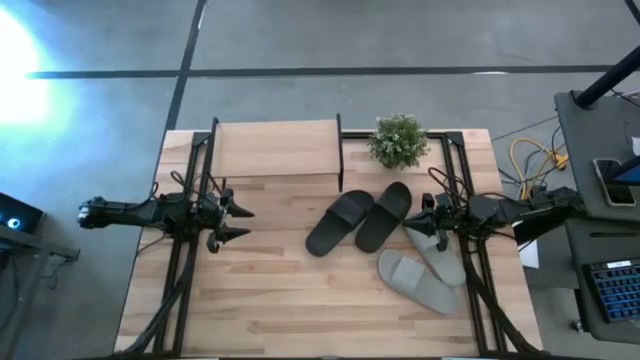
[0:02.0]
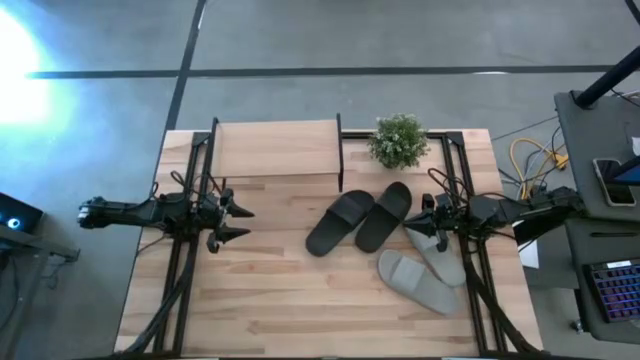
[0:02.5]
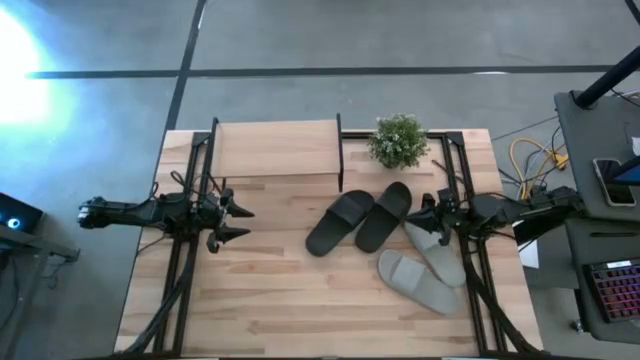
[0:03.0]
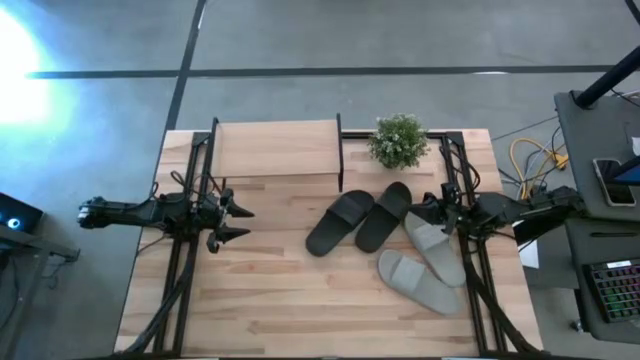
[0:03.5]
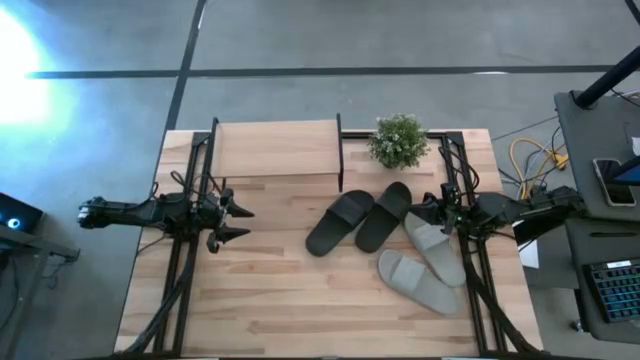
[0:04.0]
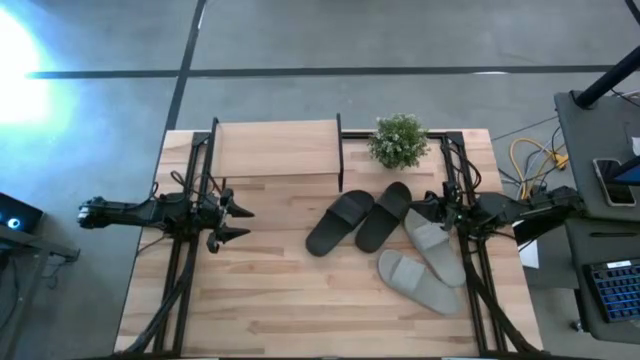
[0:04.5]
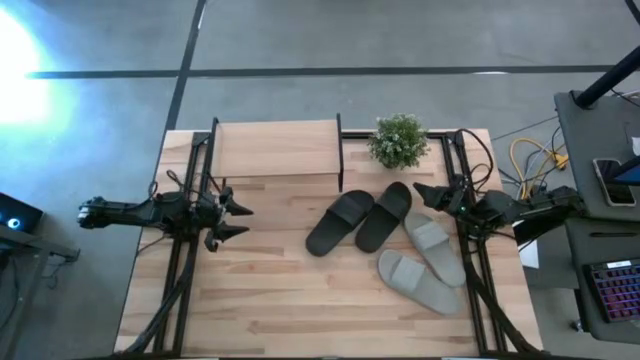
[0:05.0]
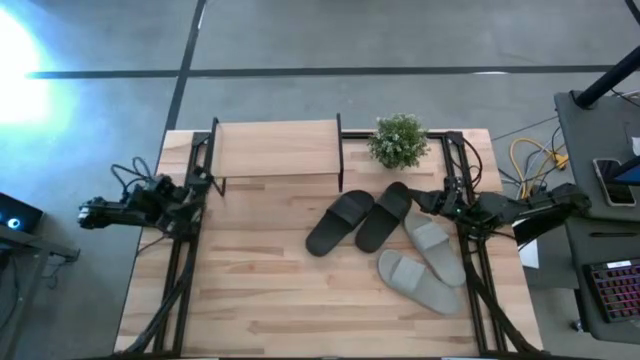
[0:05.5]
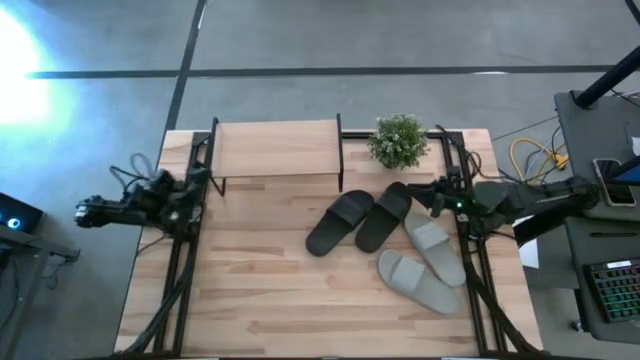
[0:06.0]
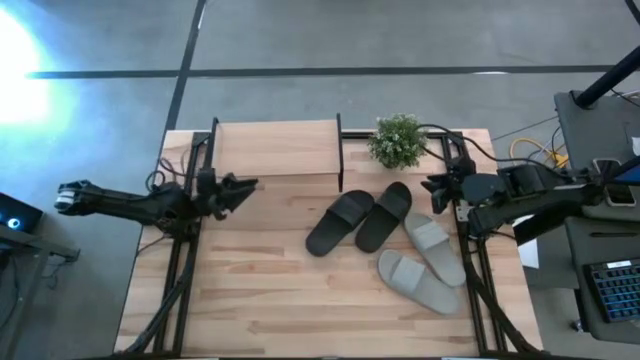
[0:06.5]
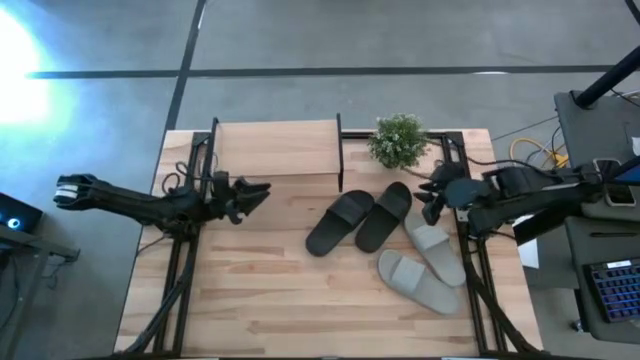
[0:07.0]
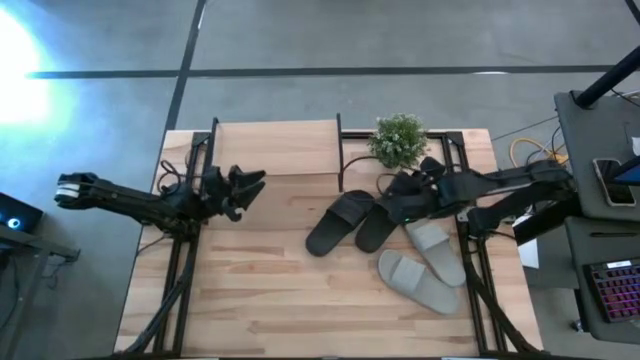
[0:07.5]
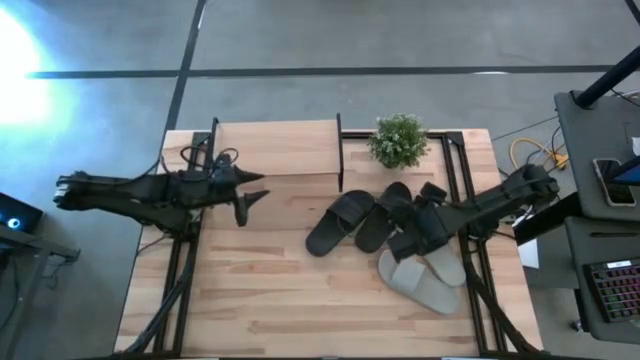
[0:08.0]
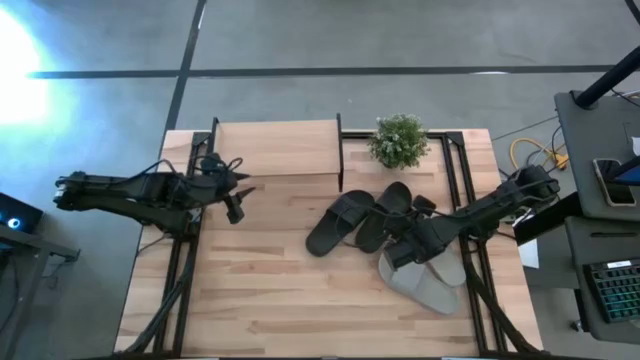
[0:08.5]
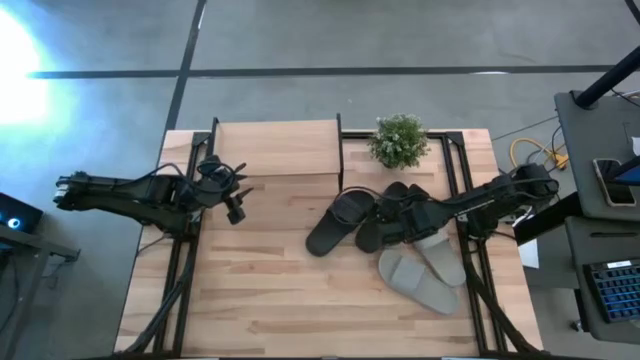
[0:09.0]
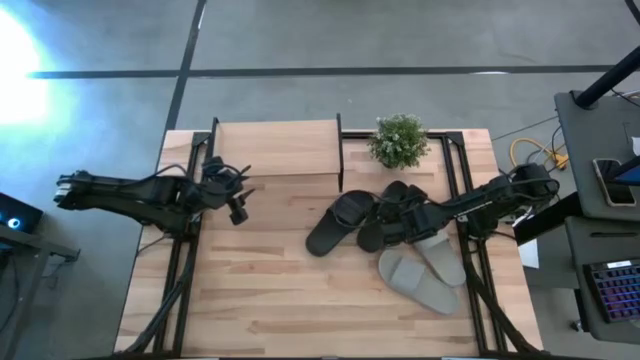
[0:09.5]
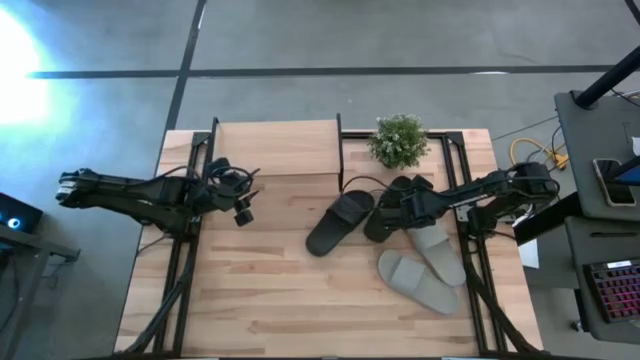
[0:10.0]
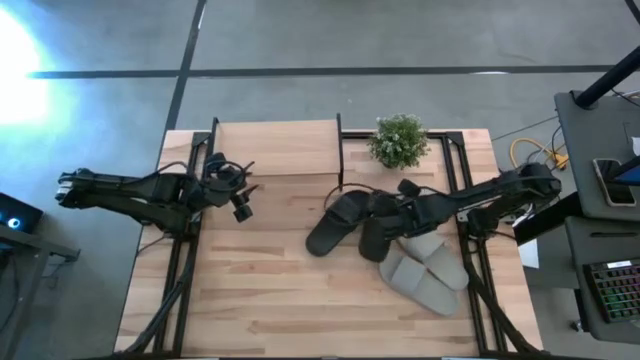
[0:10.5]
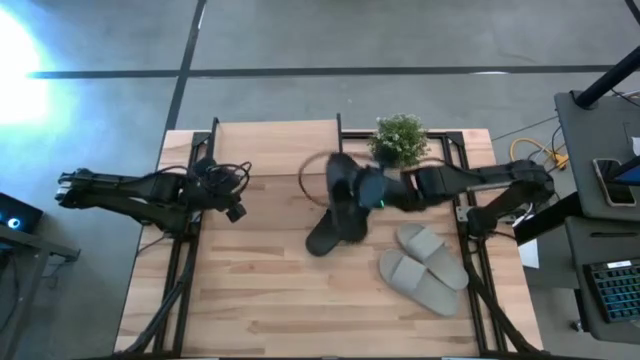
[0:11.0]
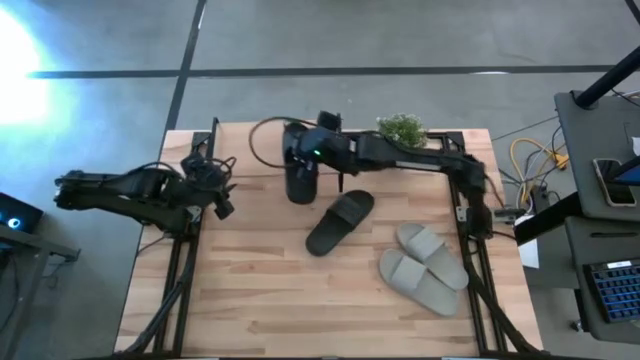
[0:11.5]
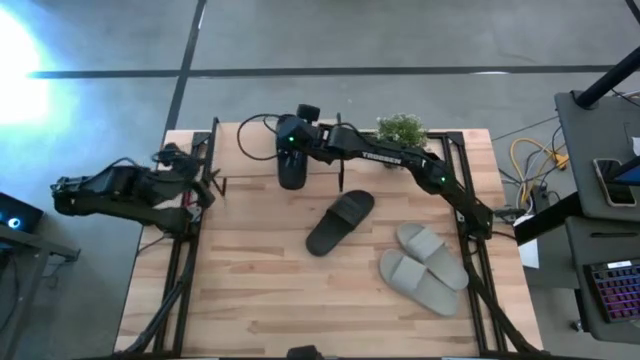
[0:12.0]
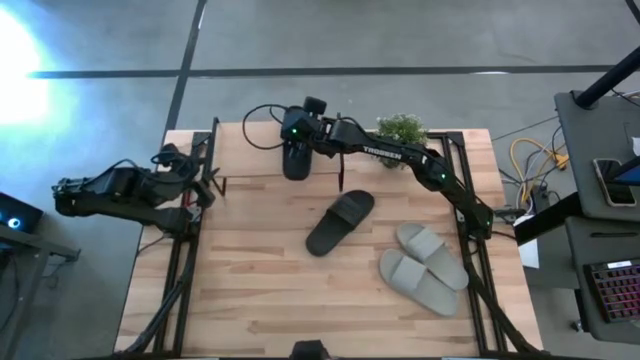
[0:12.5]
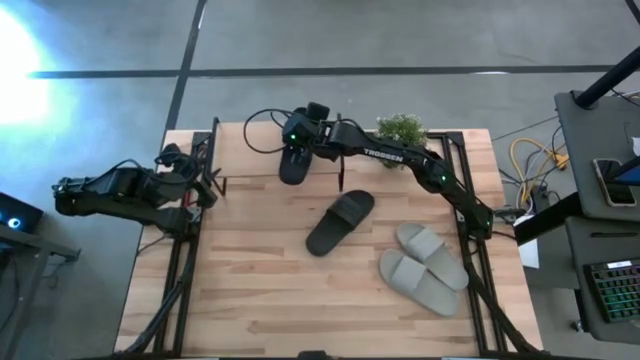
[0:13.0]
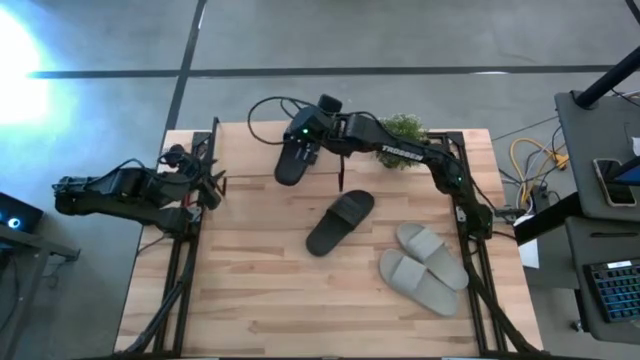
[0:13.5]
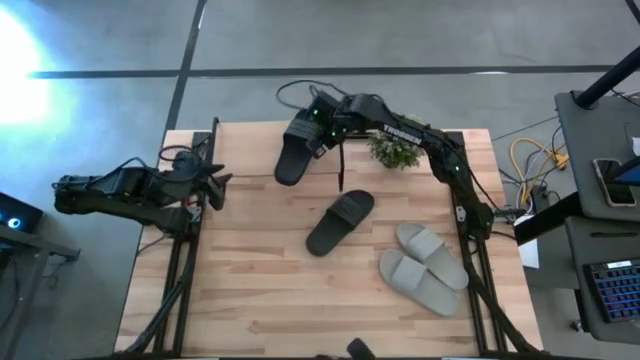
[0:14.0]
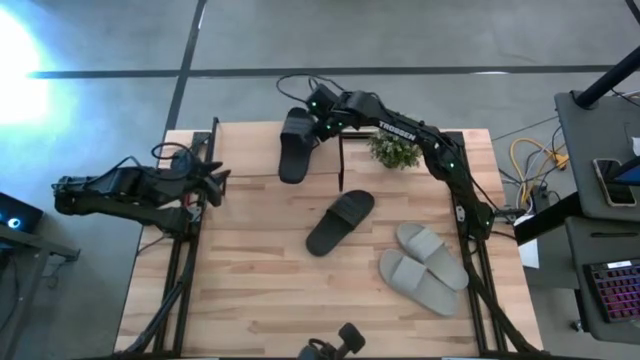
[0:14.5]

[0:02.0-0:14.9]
Task: Pick and place slides into the shelf
Put the right black slipper on the shelf

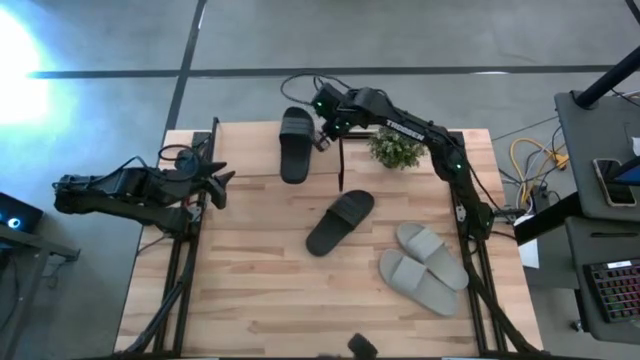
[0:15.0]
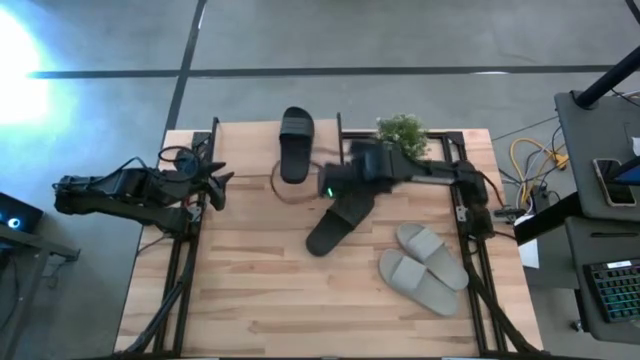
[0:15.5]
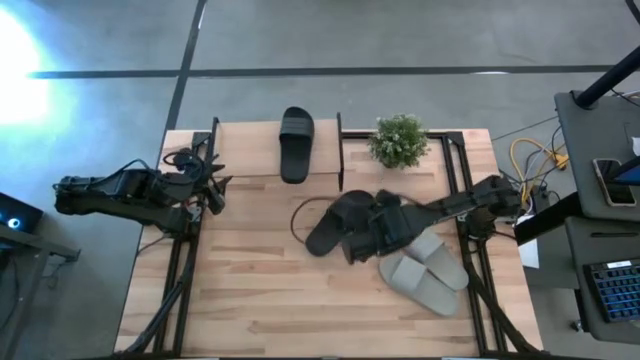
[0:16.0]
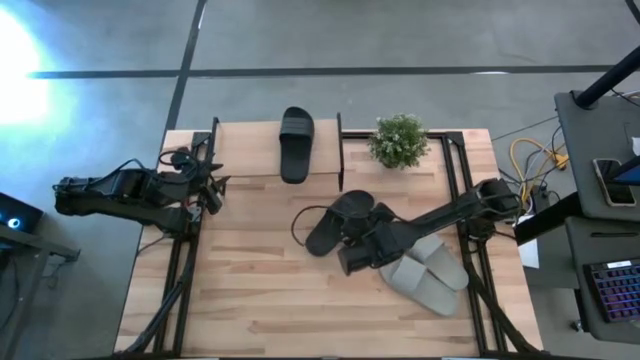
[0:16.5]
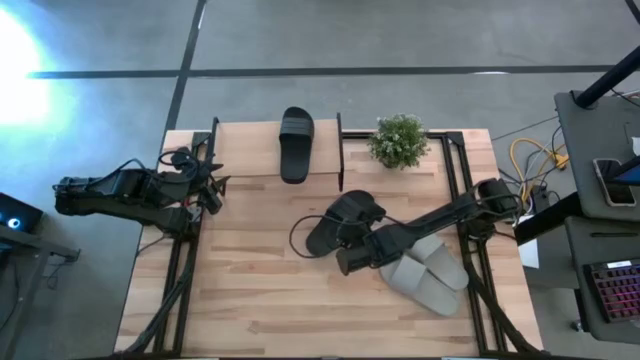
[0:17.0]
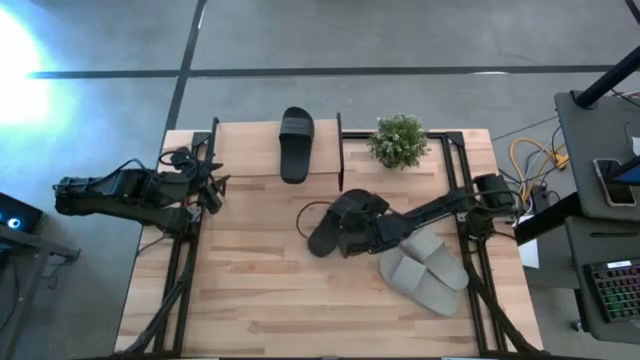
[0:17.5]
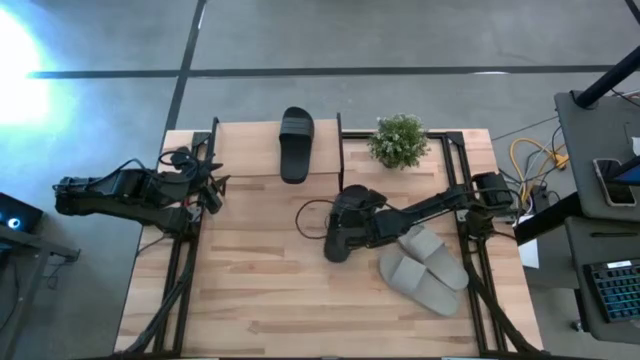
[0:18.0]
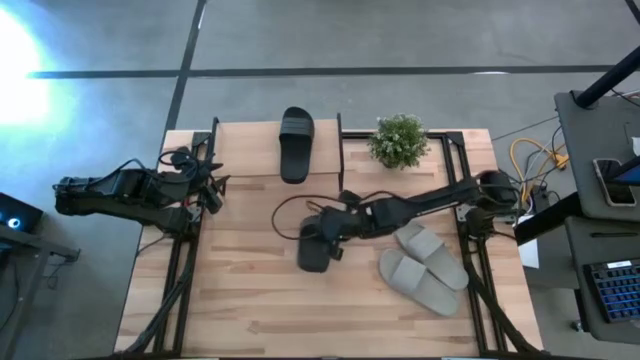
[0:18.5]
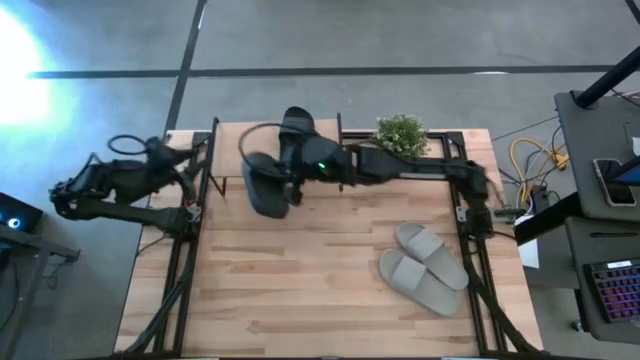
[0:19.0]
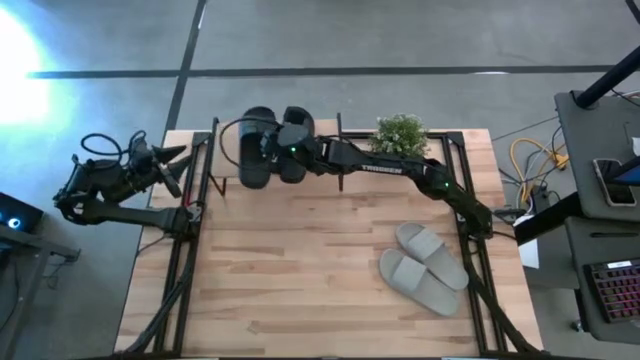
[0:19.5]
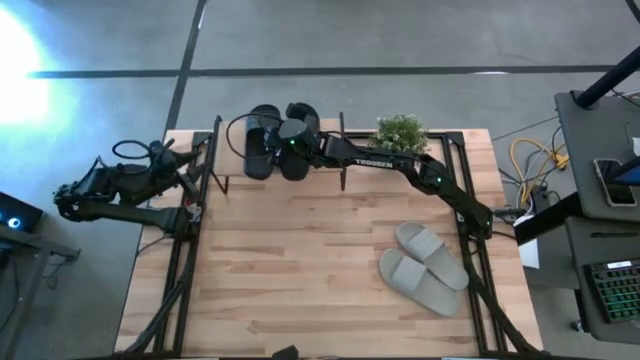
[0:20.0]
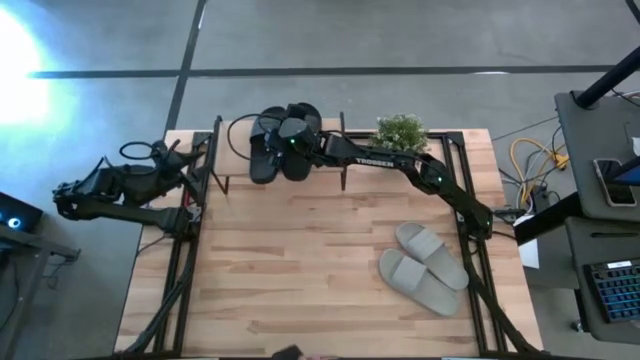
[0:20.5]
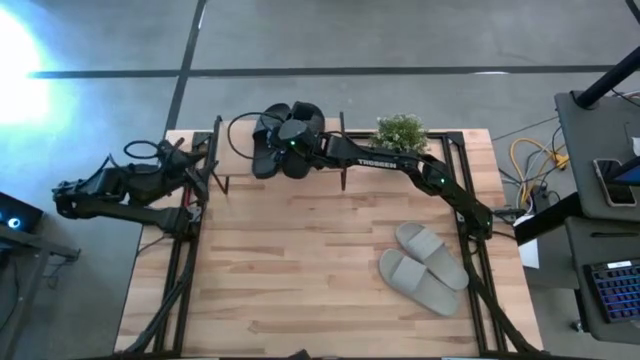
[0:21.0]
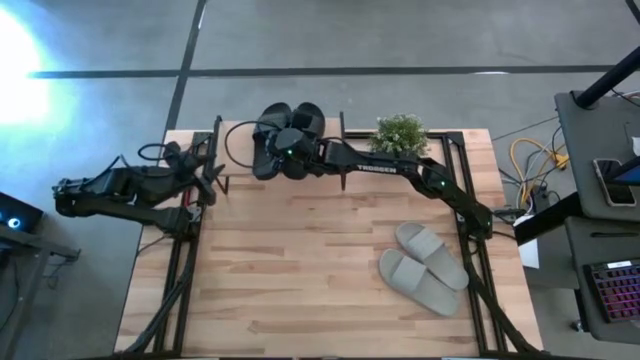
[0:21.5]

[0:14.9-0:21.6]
Put the black slipper on the shelf
